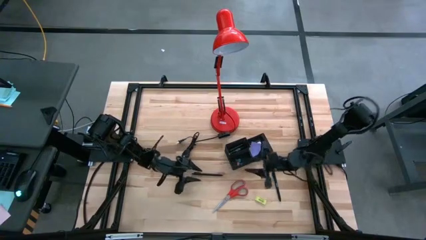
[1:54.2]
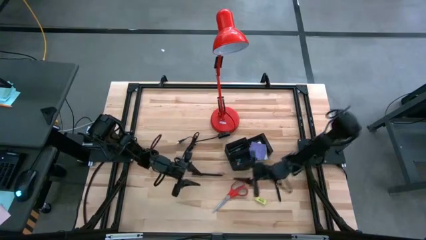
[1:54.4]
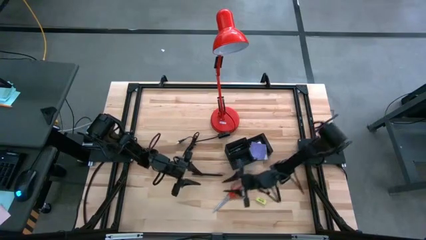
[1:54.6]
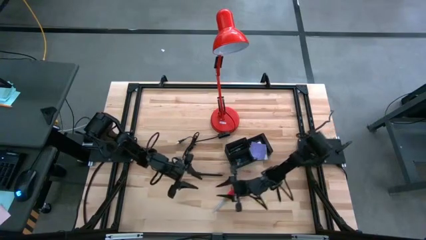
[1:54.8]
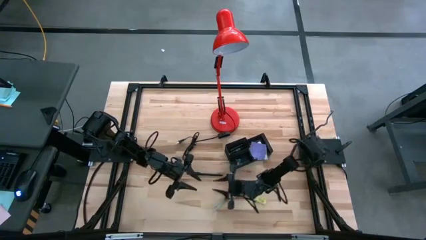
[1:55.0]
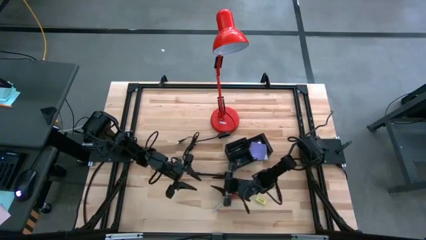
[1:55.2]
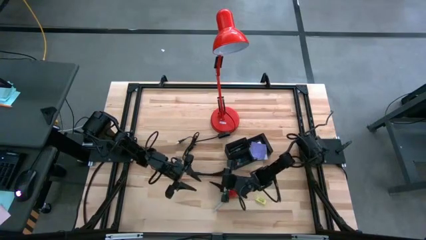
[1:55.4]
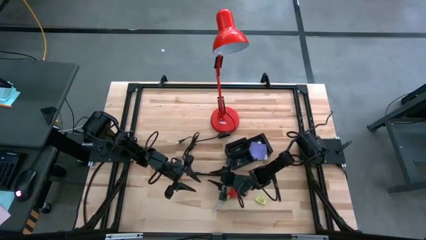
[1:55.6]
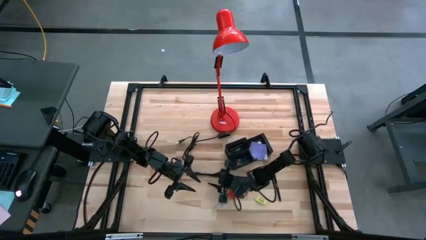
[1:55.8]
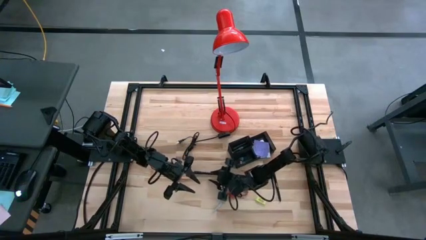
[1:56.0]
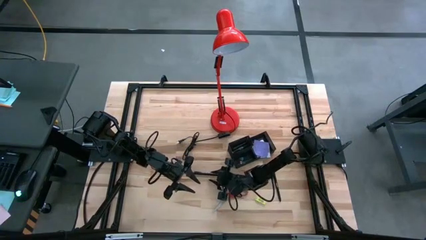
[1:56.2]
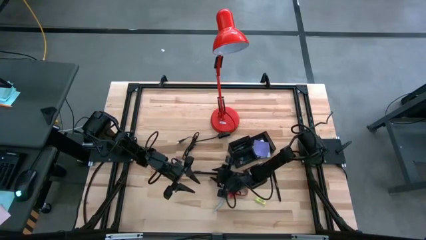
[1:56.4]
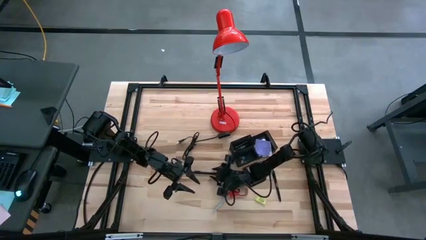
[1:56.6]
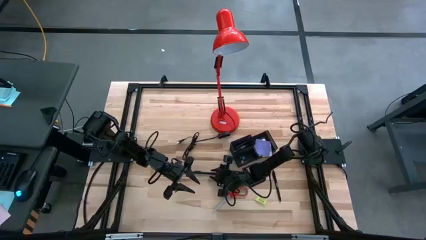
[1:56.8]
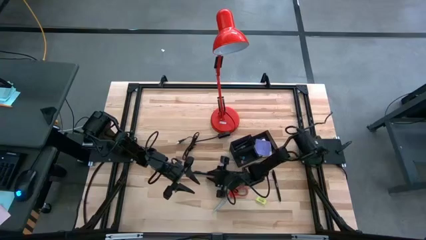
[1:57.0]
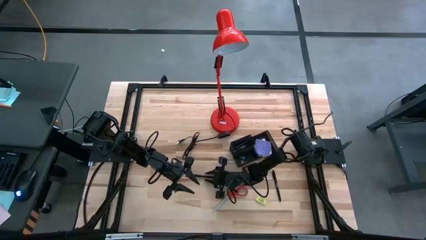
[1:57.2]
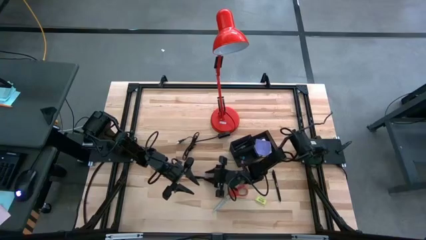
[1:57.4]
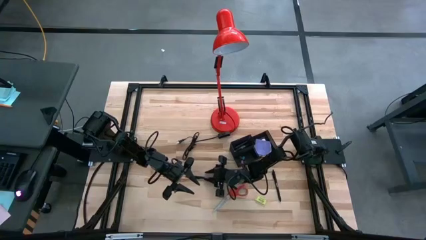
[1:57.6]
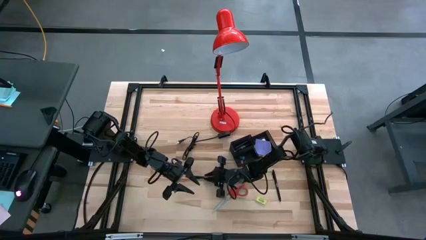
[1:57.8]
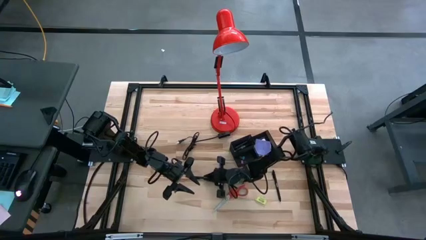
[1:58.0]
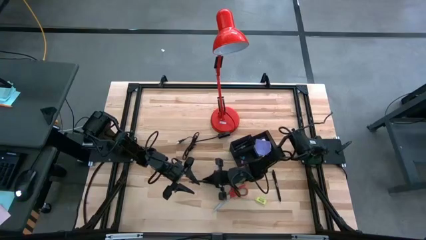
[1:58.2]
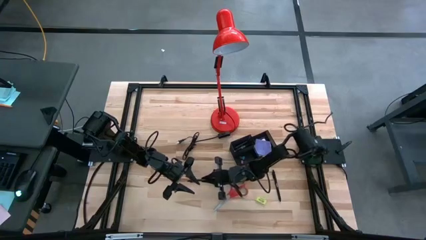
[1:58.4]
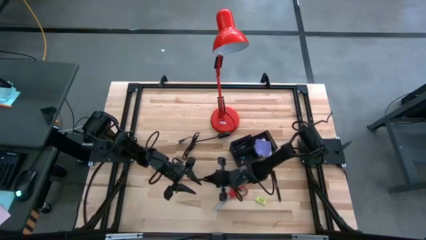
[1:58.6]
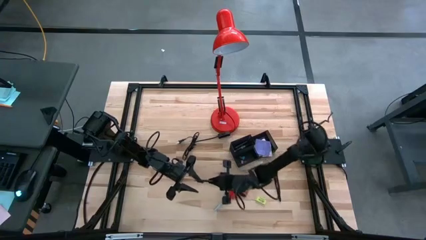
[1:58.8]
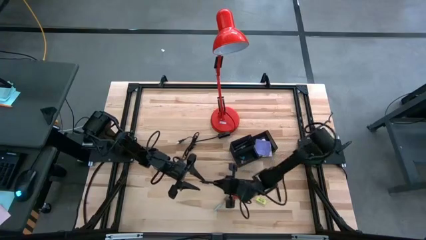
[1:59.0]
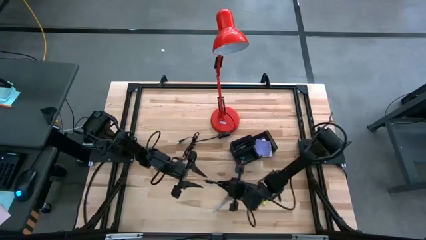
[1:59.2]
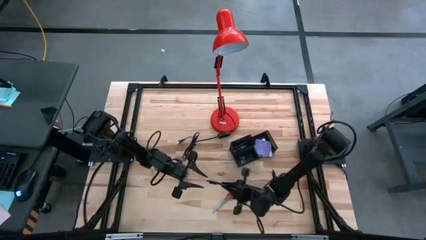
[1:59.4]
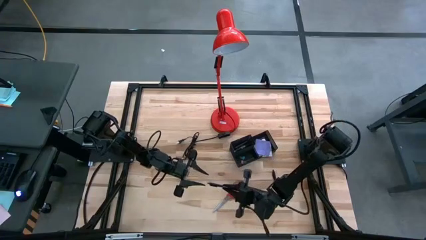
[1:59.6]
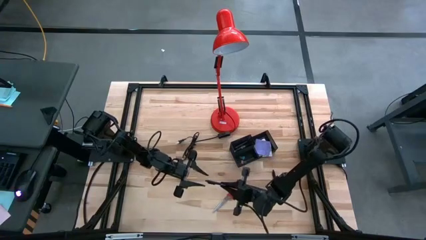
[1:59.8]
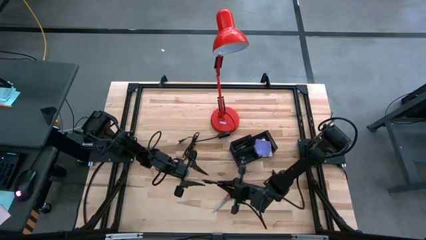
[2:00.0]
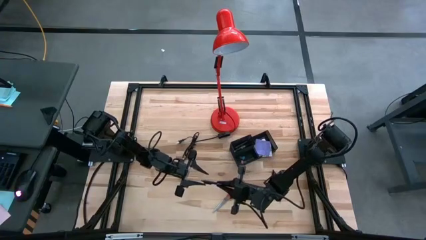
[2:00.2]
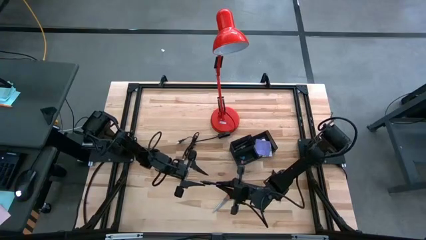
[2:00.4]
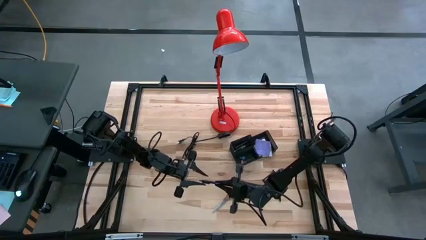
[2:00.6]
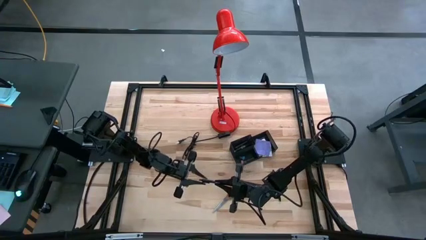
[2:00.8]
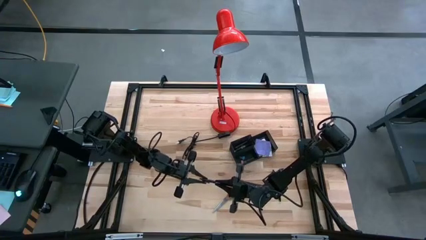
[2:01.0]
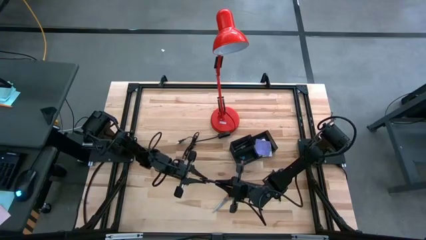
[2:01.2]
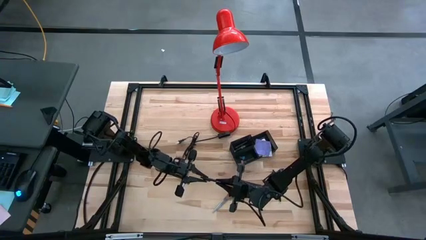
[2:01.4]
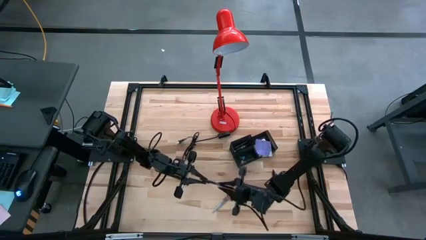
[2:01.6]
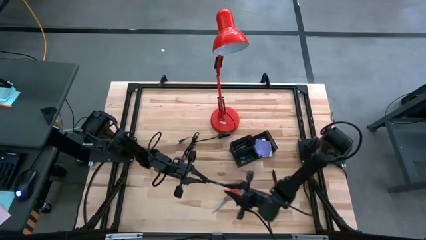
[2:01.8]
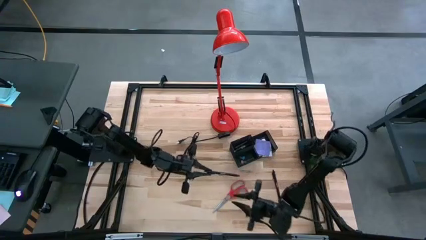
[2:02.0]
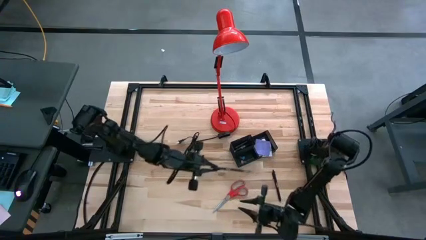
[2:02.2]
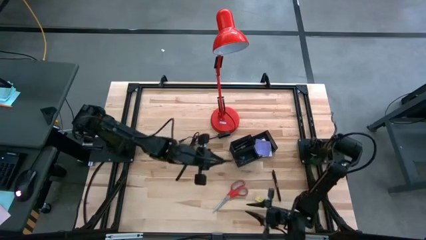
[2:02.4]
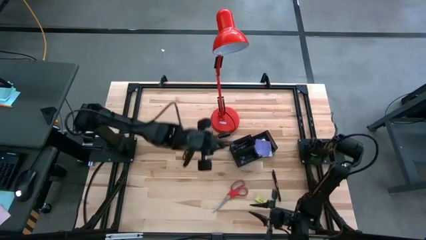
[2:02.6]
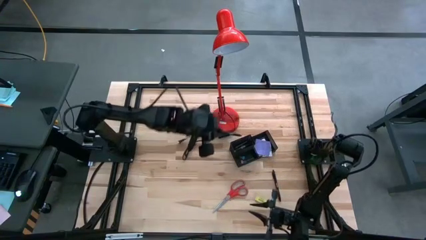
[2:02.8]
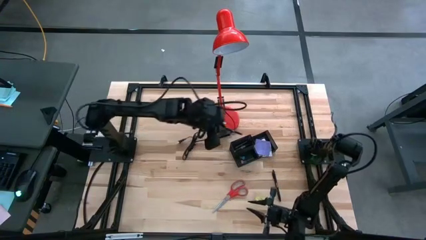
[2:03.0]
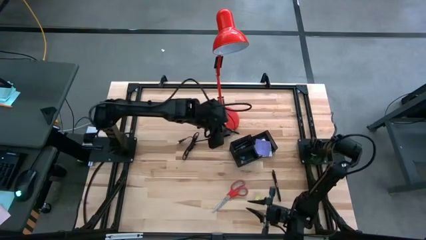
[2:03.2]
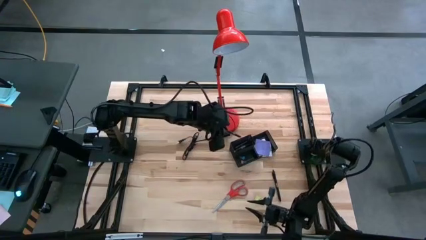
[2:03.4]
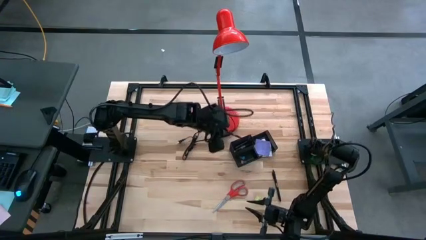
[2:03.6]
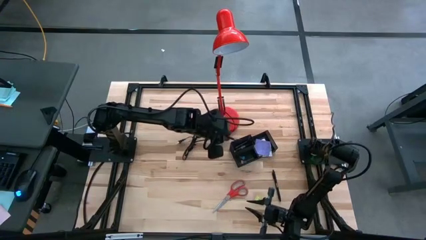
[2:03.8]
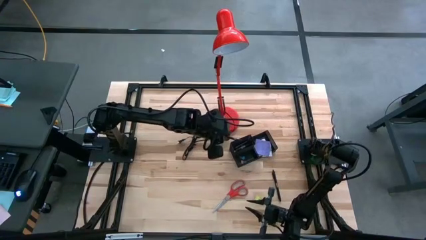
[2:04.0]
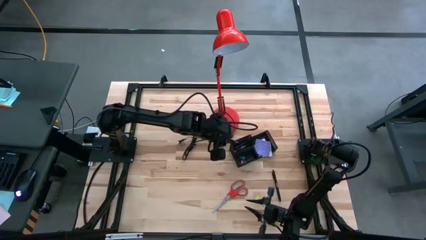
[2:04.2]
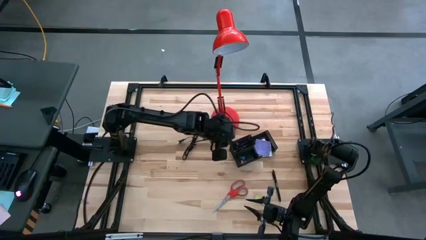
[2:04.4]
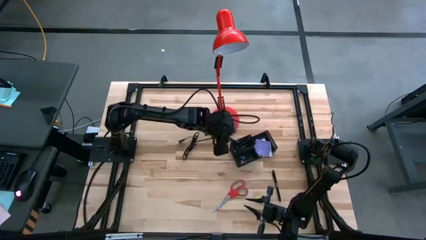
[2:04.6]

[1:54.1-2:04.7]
Task: Pick and place office supplies into organizer
Put the black pen into the desk organizer
